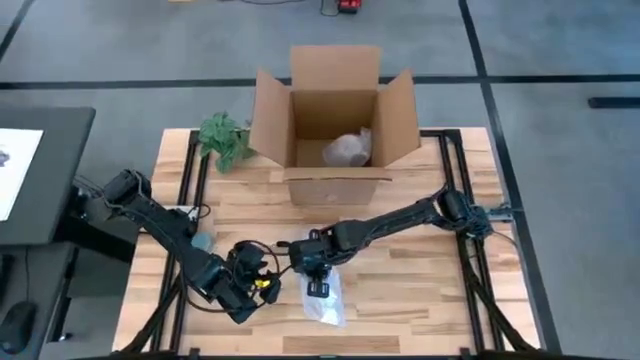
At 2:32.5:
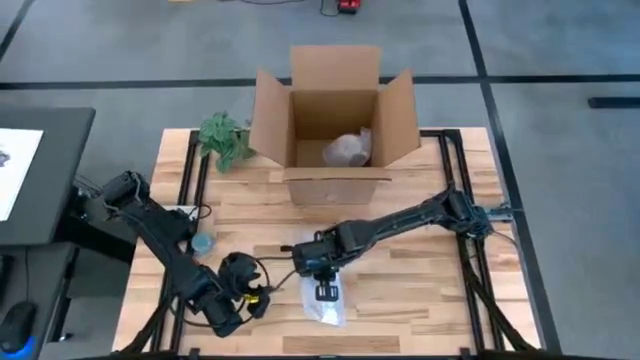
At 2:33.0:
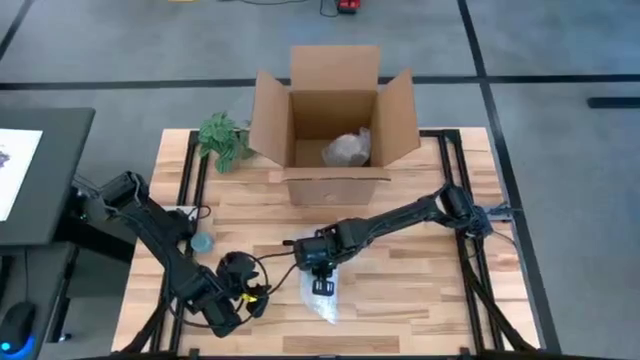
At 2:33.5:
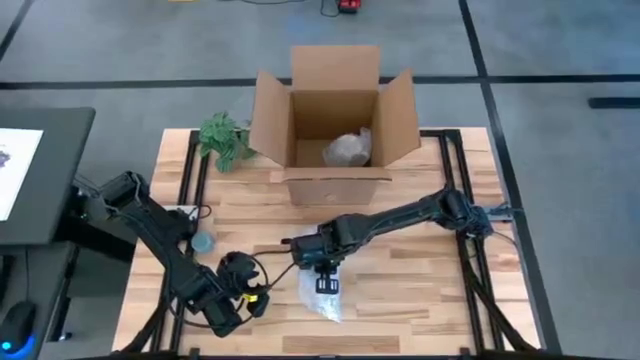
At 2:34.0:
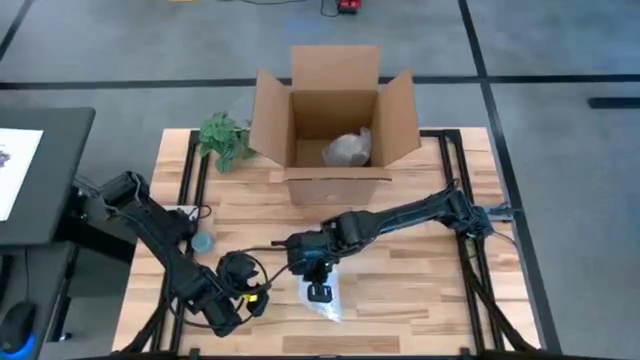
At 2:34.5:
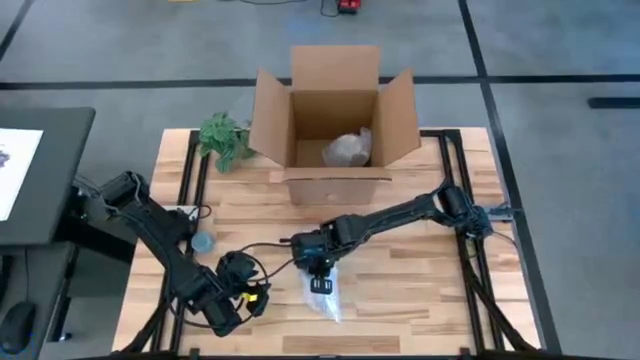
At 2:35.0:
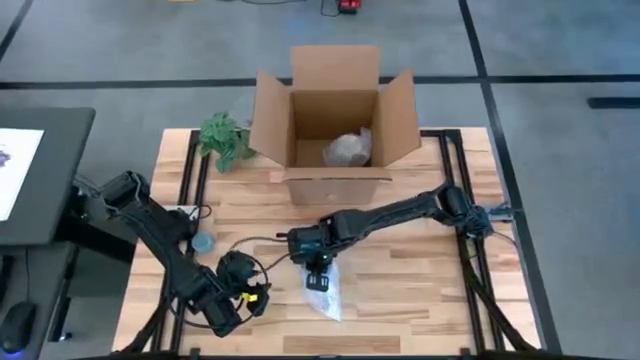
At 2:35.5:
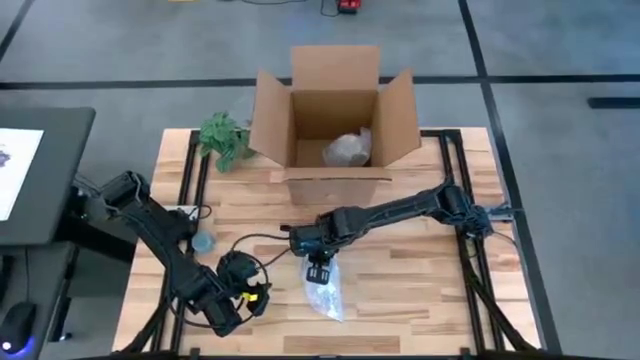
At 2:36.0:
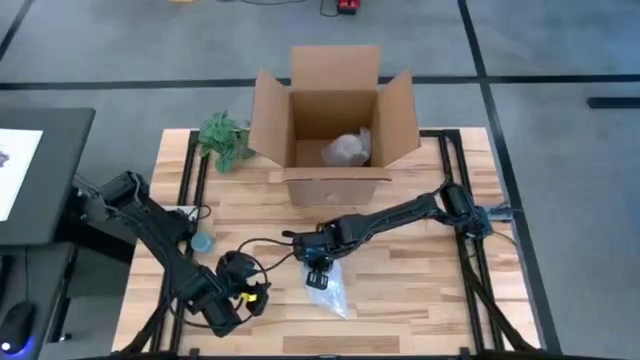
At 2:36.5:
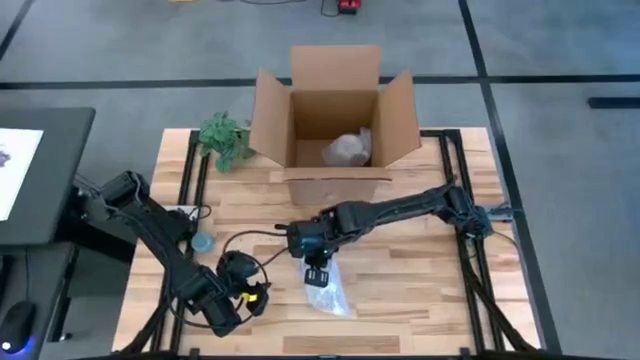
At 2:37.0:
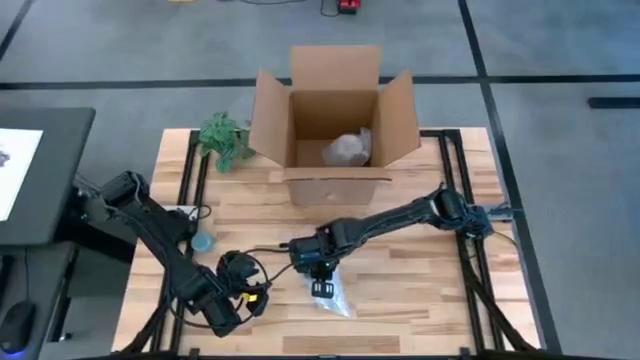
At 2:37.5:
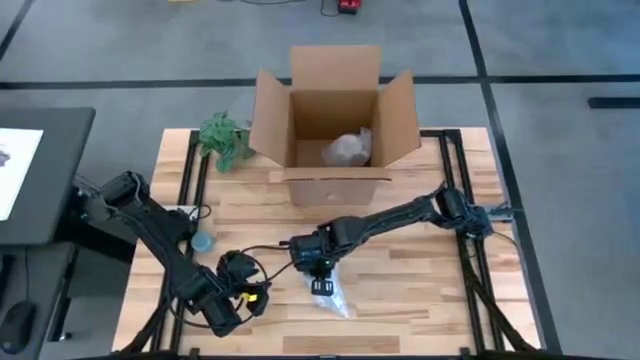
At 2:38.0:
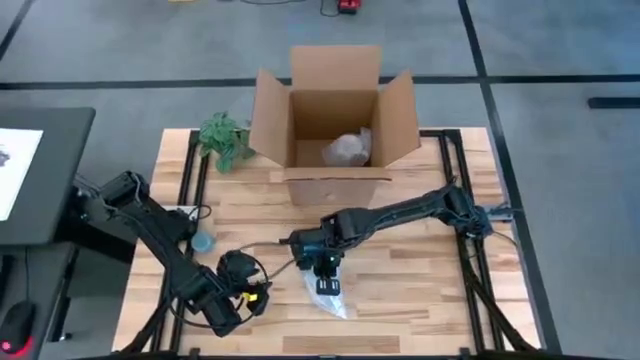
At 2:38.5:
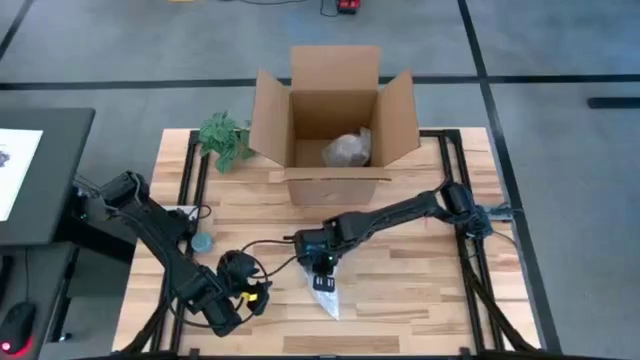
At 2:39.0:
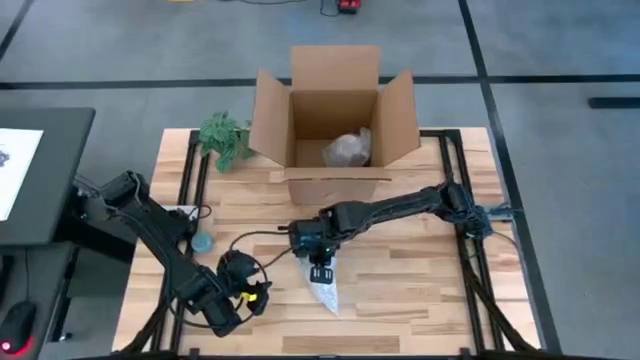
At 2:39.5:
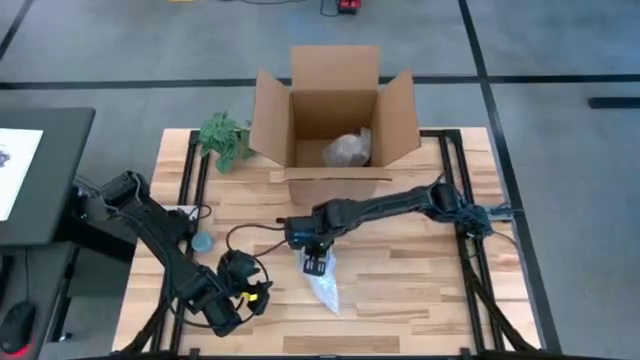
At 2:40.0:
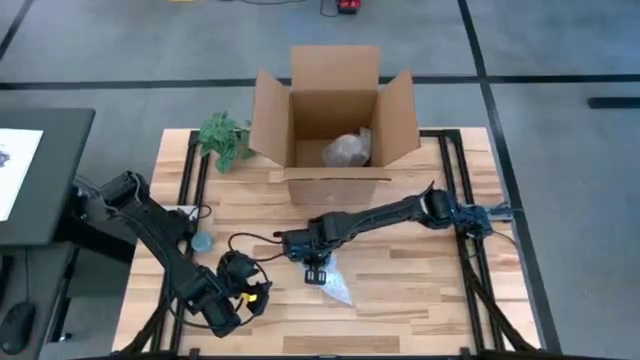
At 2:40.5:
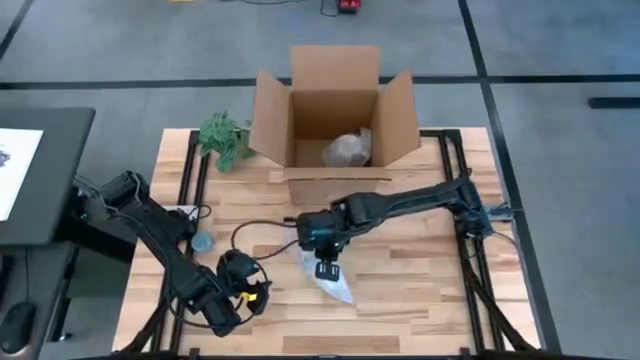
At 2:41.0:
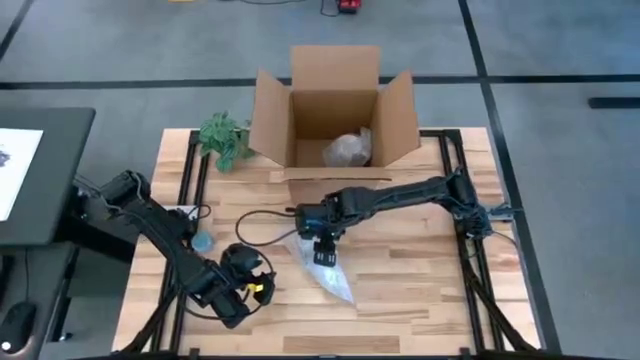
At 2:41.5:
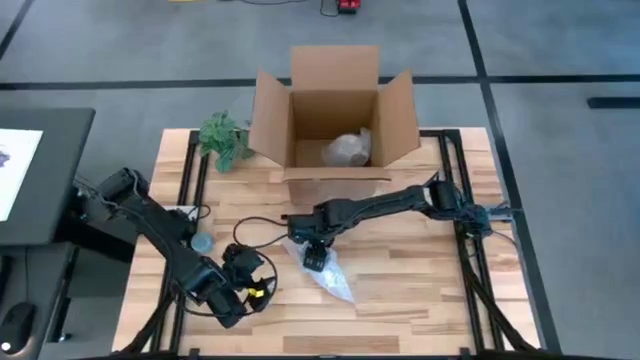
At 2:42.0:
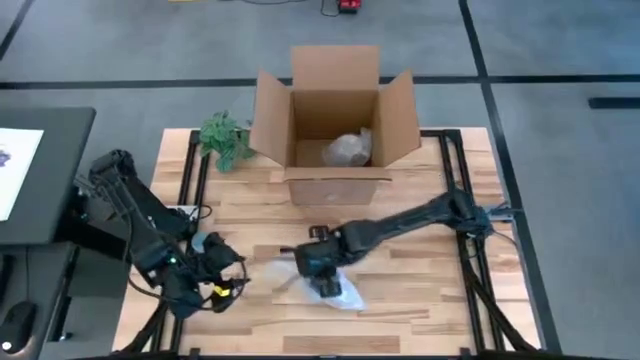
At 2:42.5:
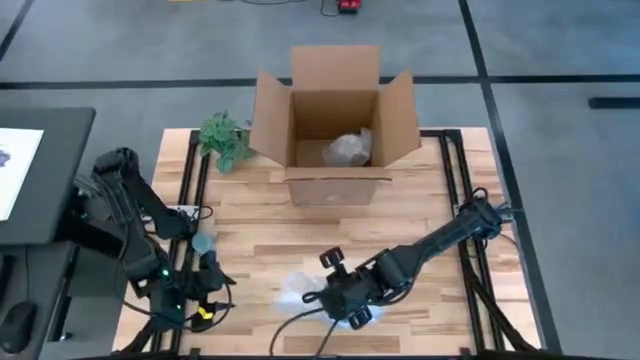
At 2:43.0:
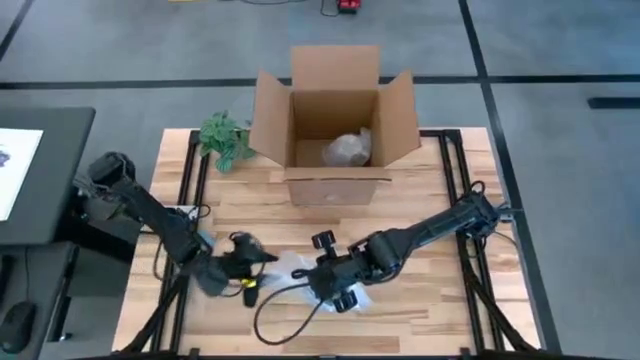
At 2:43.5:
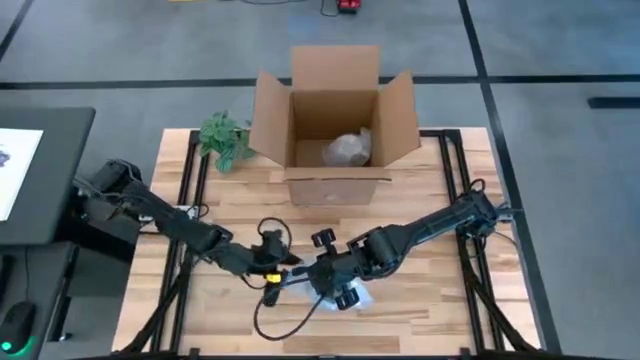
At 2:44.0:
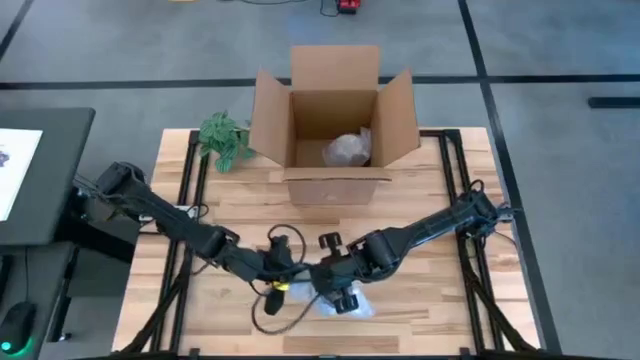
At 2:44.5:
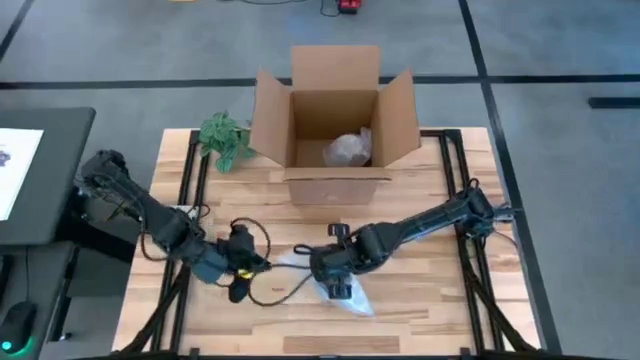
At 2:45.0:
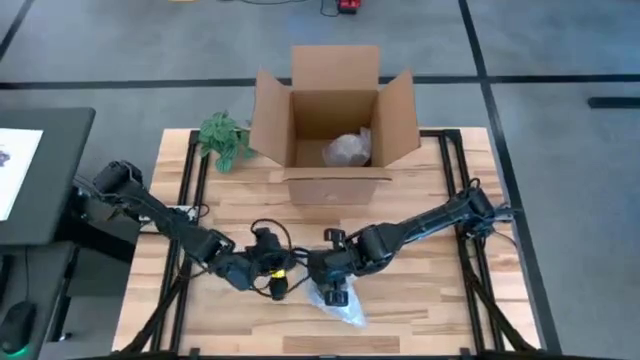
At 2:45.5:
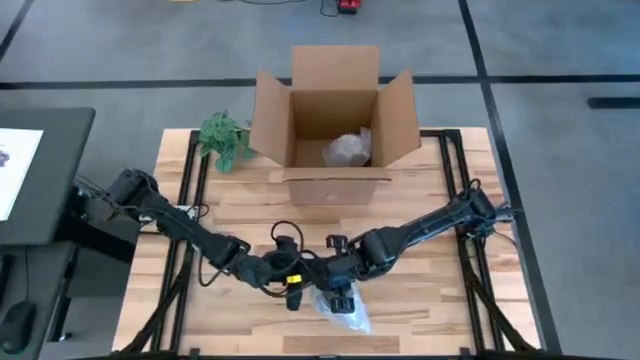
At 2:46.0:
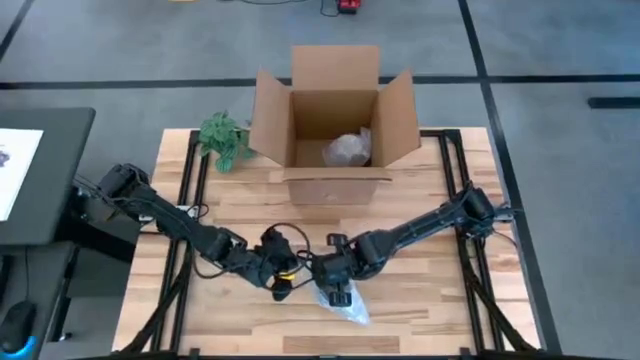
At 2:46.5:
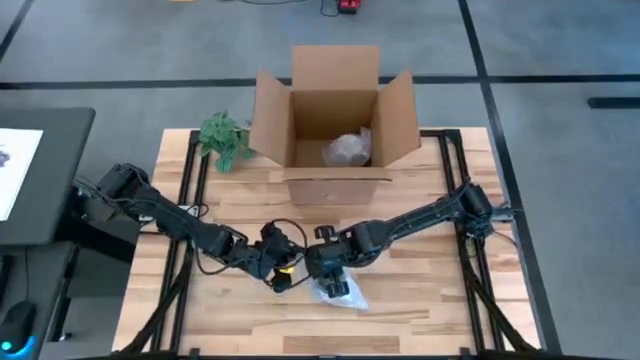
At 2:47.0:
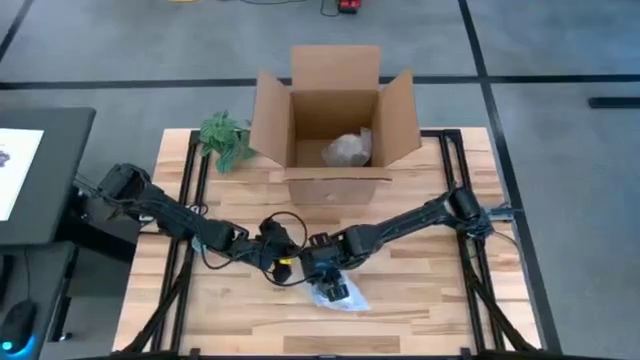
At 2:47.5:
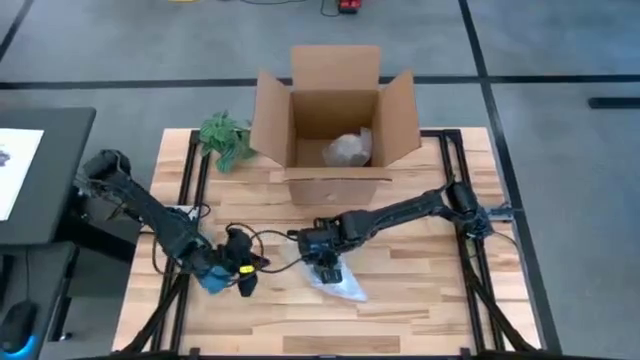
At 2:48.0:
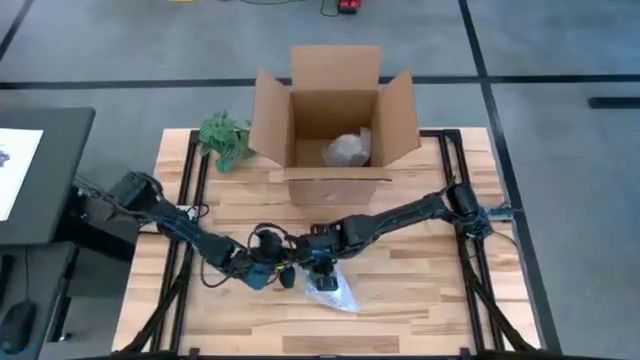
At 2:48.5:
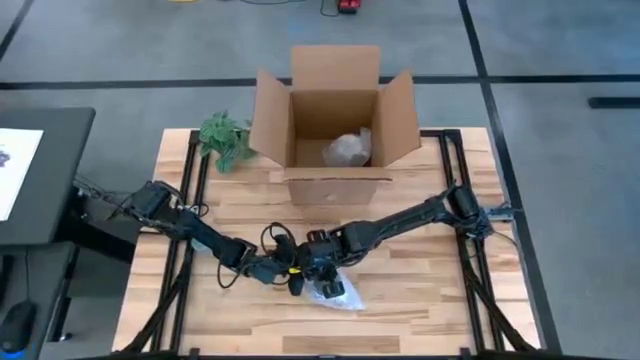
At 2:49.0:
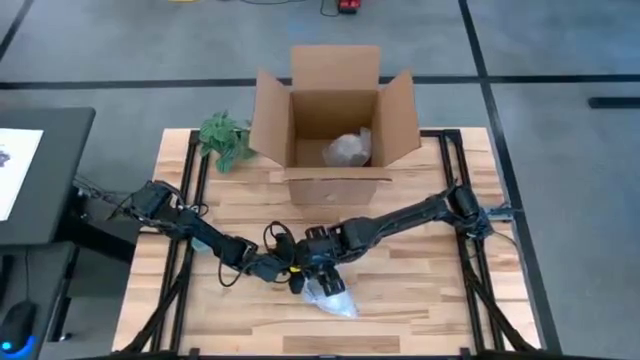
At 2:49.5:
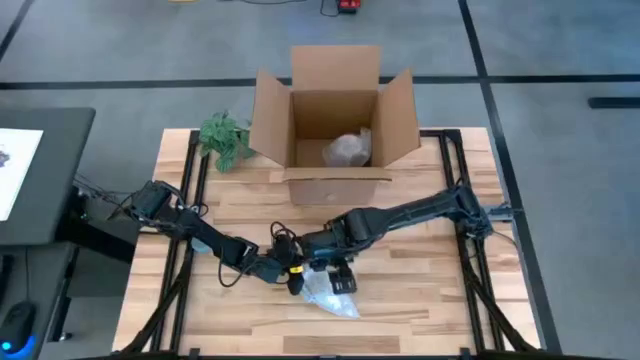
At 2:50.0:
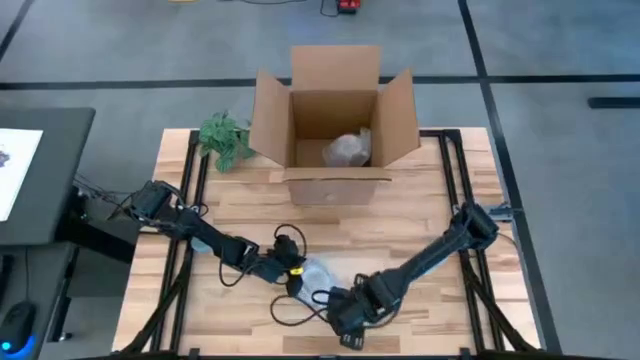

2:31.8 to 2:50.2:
Task: wrap mug
Wrap the blue mug with bubble wrap

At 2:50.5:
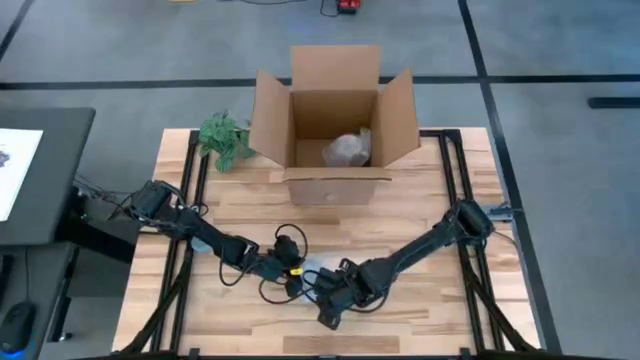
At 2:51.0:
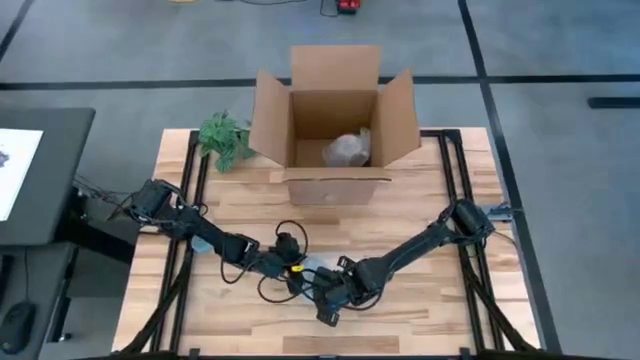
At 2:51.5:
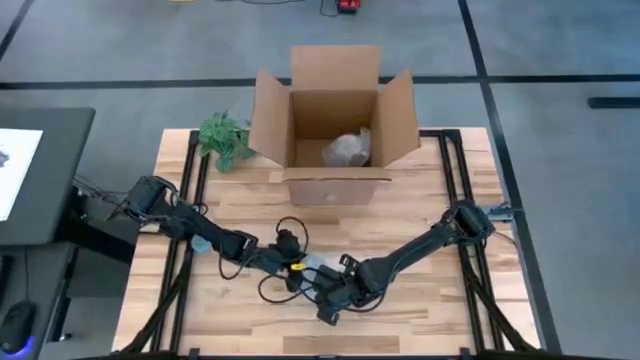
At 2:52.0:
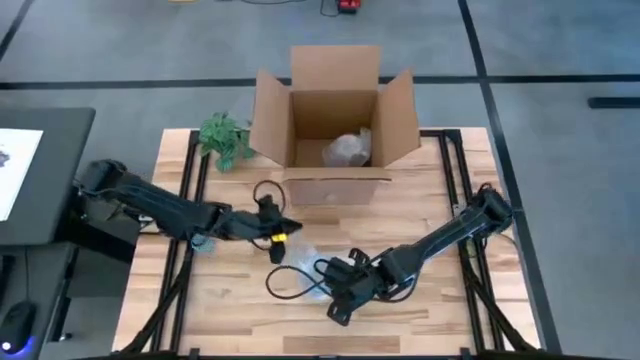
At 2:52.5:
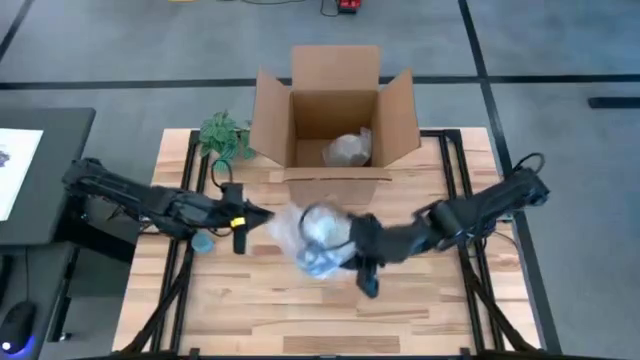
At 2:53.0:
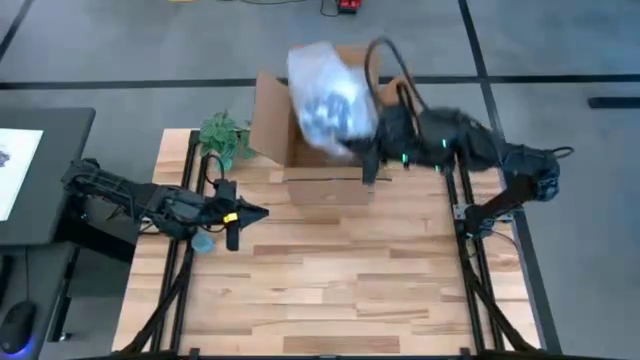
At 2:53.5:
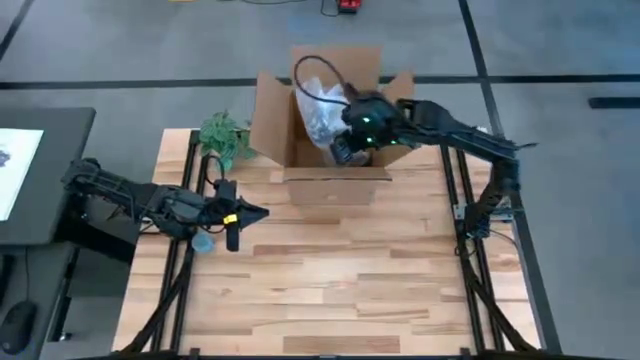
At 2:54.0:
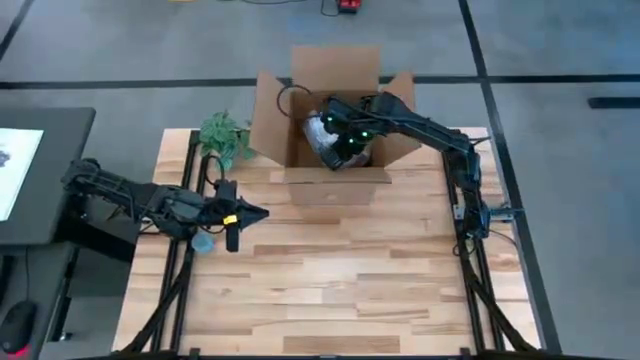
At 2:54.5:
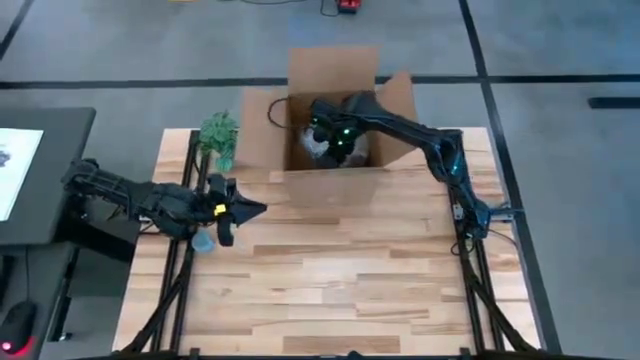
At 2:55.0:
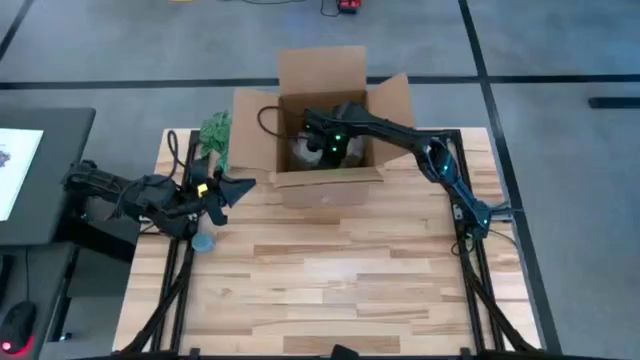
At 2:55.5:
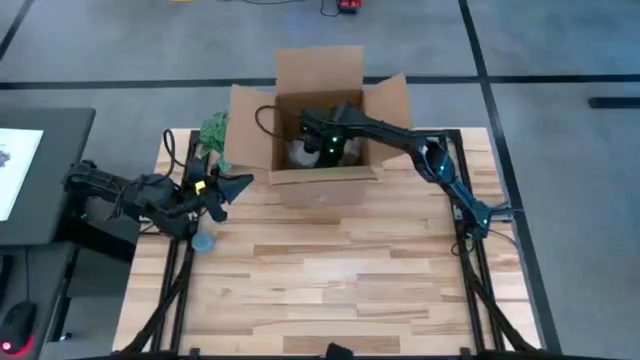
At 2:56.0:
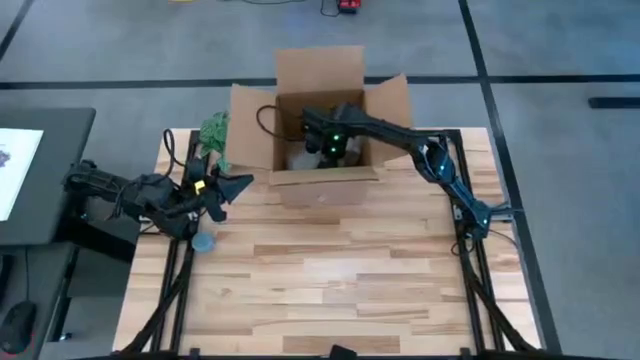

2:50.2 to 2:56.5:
Put the wrapped blue mug into the box
